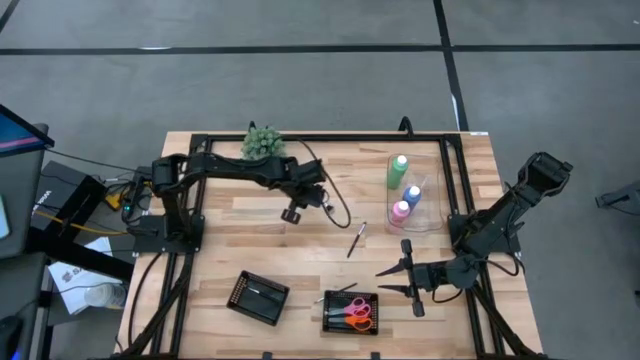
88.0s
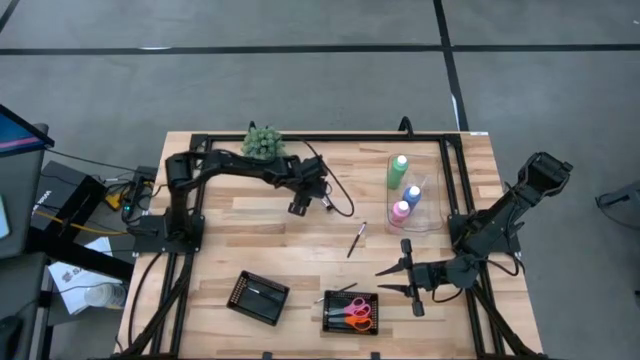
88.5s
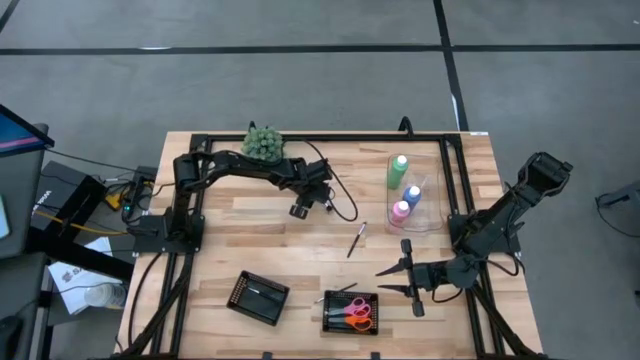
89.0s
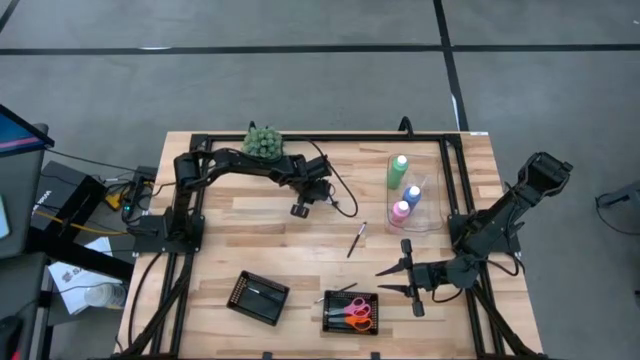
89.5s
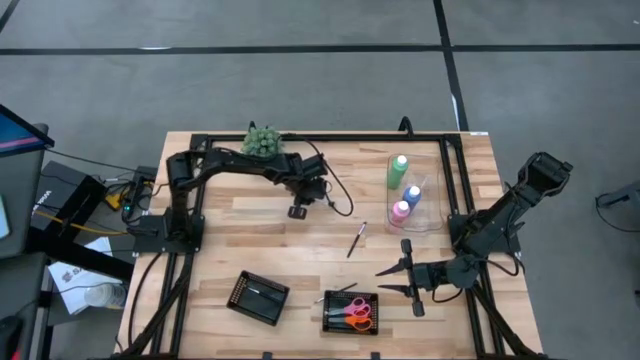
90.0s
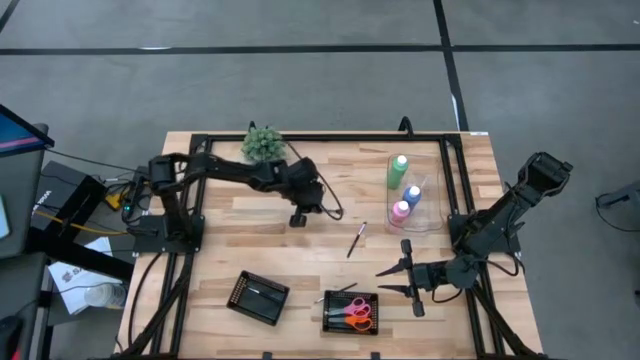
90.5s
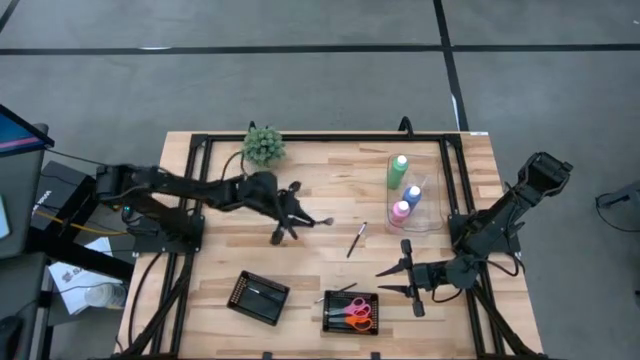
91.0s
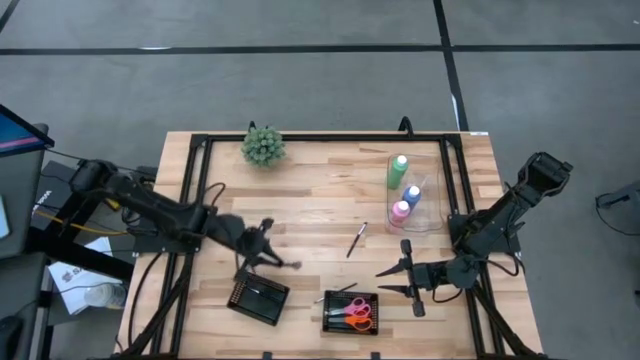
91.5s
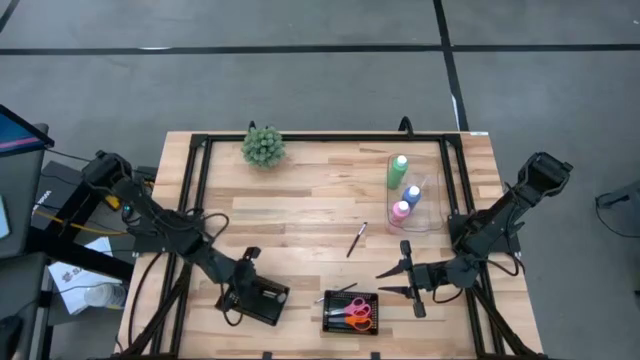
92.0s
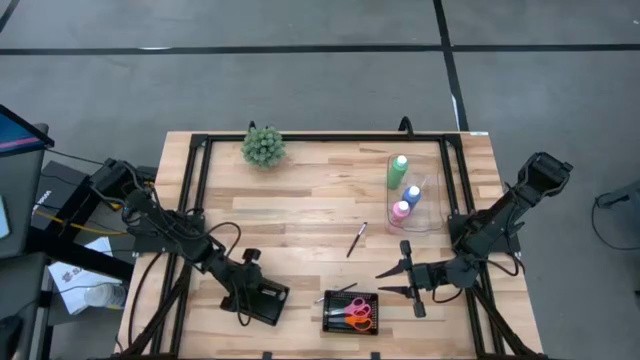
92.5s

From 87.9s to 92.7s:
Task: Pick & Place Paint Supplies
Put the black makeup brush into the left black bin

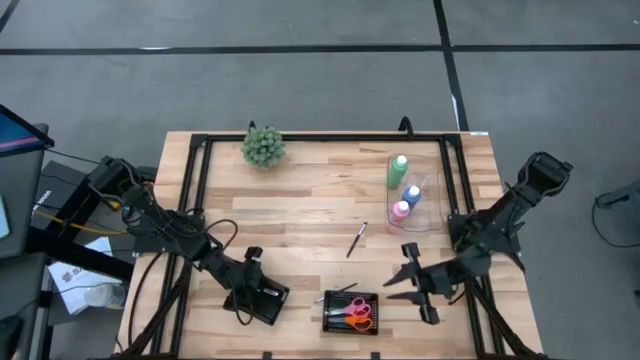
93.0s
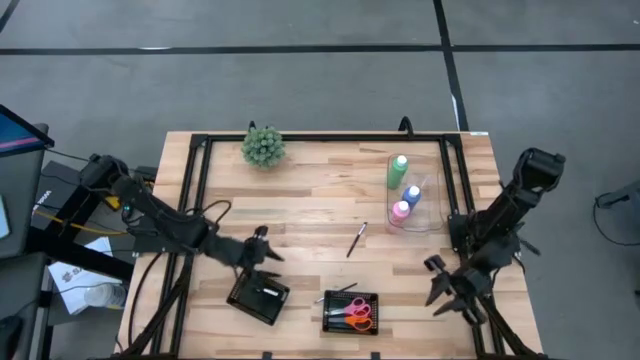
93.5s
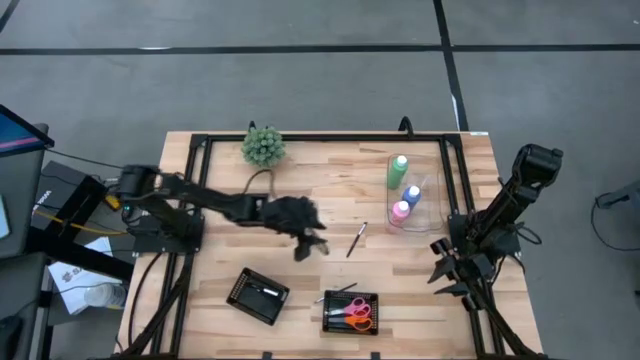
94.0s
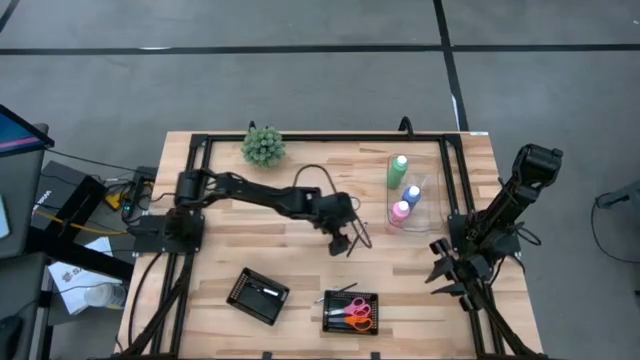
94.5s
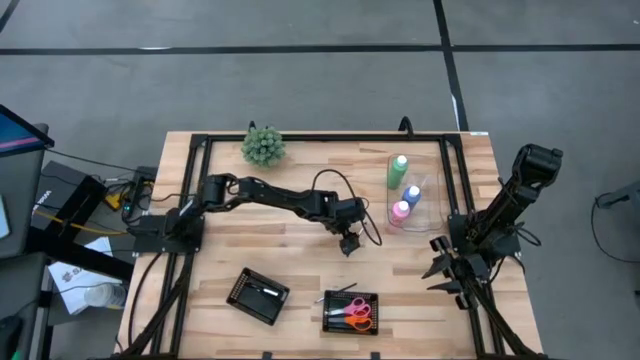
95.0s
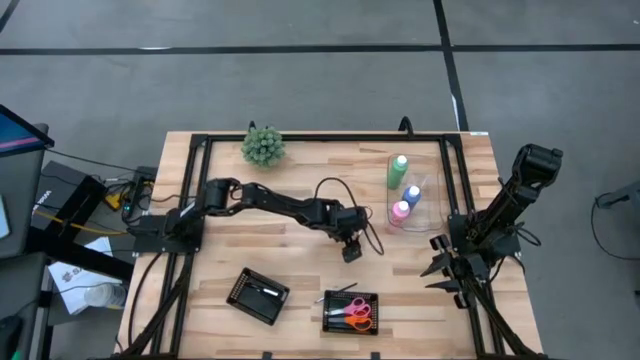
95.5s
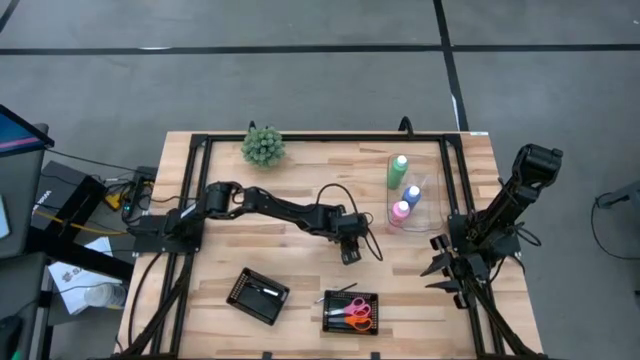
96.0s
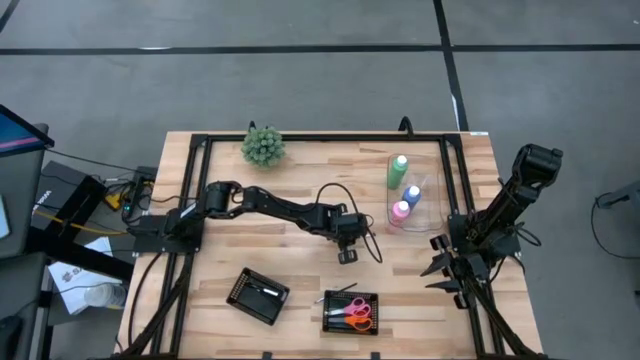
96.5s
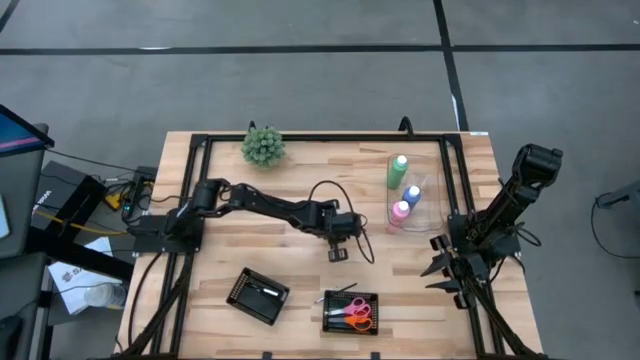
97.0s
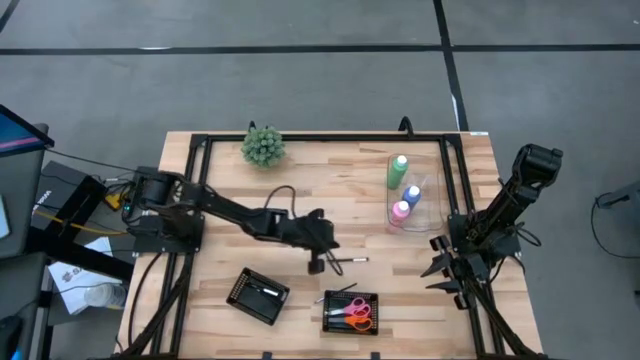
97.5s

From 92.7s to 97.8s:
Put the black makeup brush into the left black bin

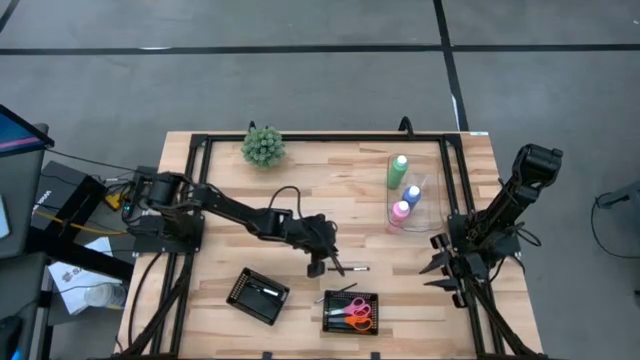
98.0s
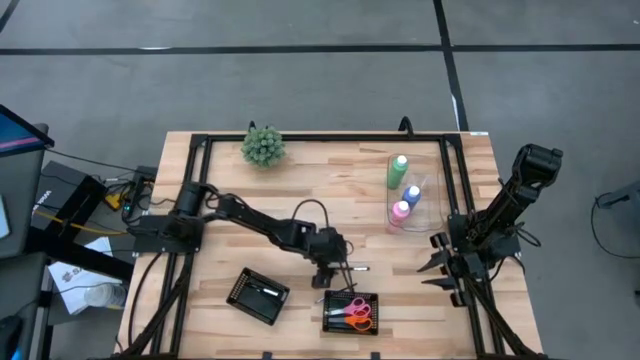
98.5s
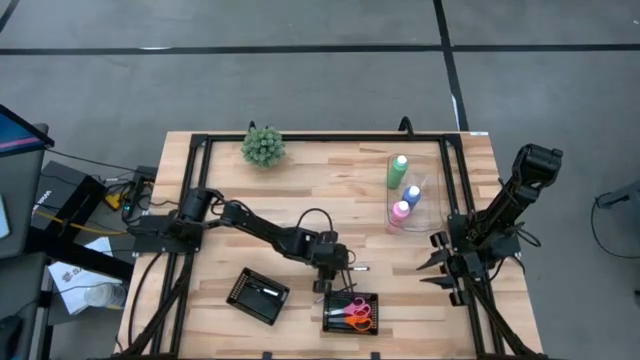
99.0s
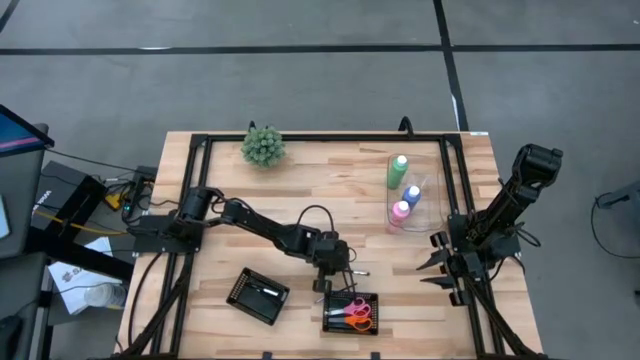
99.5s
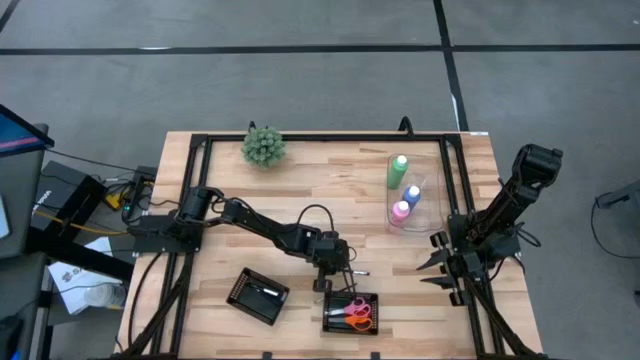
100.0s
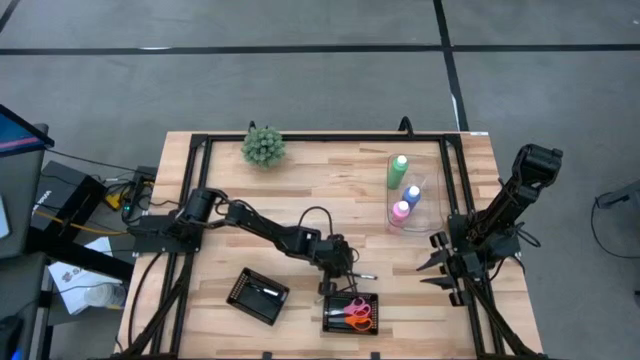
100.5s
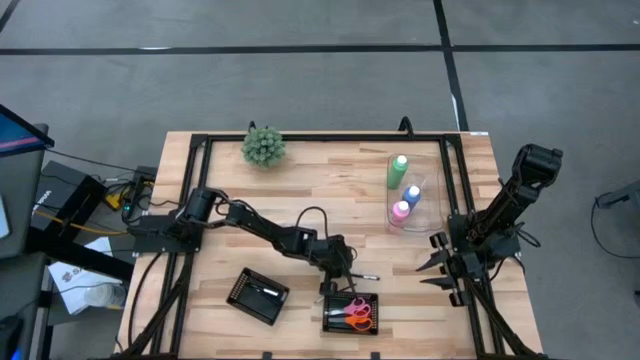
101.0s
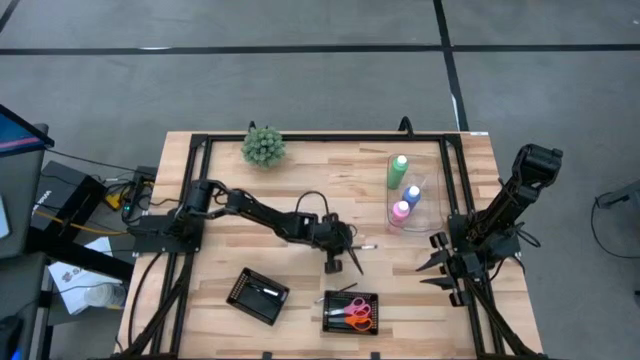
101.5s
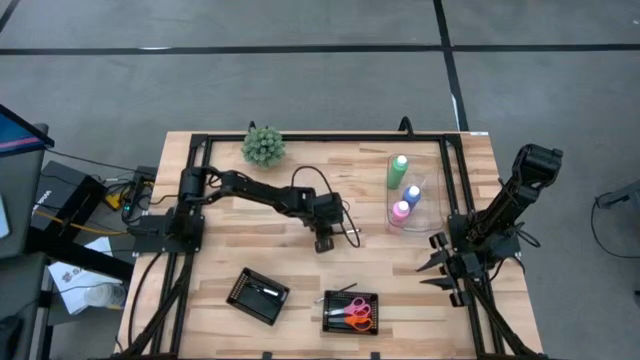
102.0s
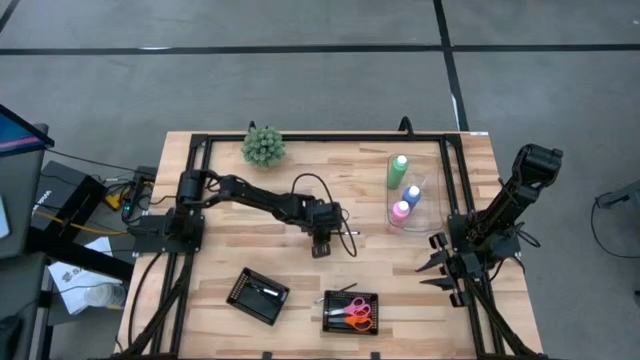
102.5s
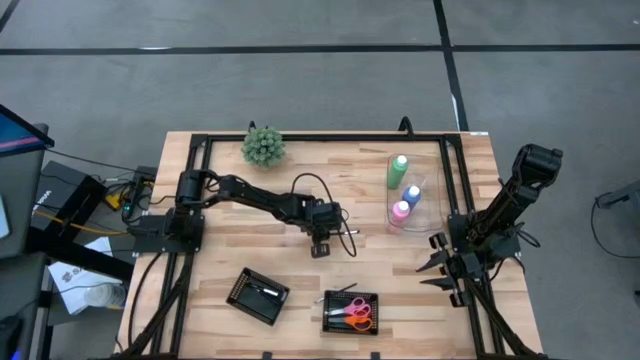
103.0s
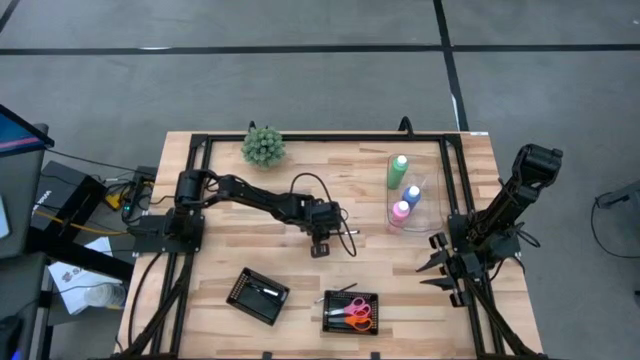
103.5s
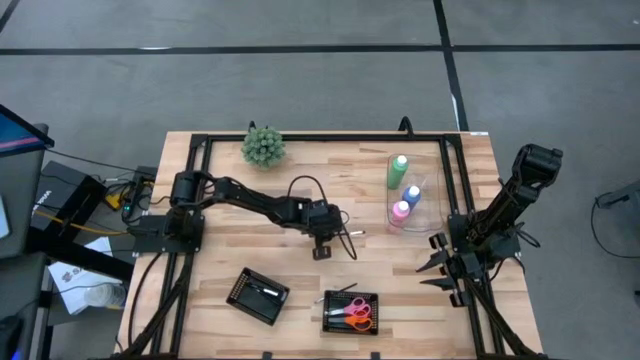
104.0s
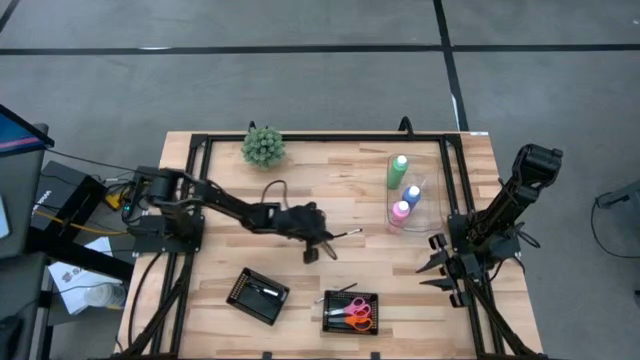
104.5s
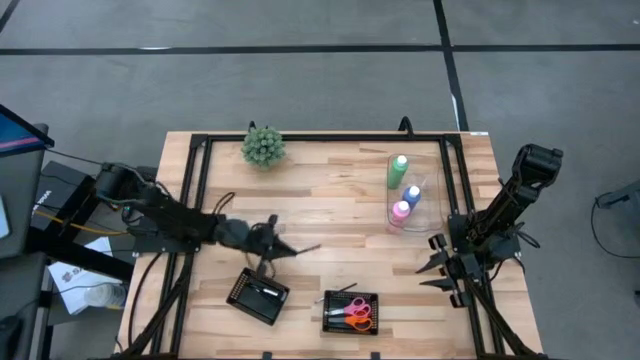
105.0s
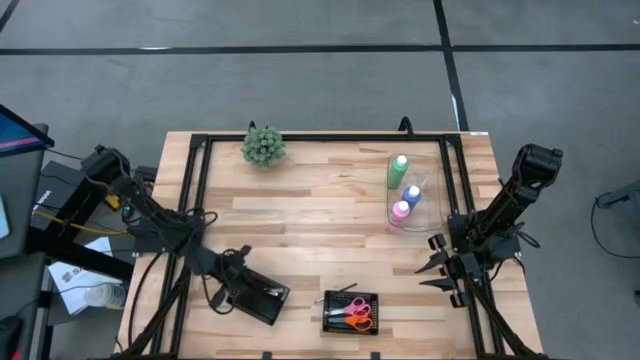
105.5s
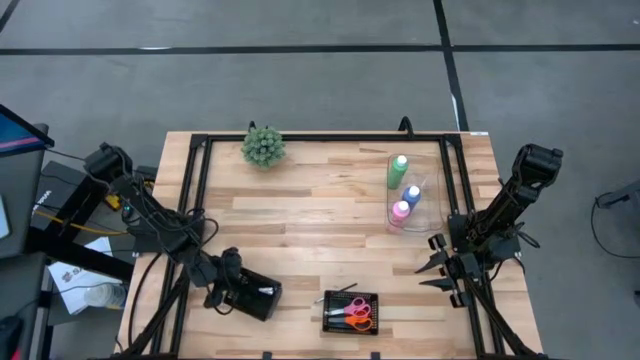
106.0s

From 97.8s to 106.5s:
Put the black makeup brush into the left black bin

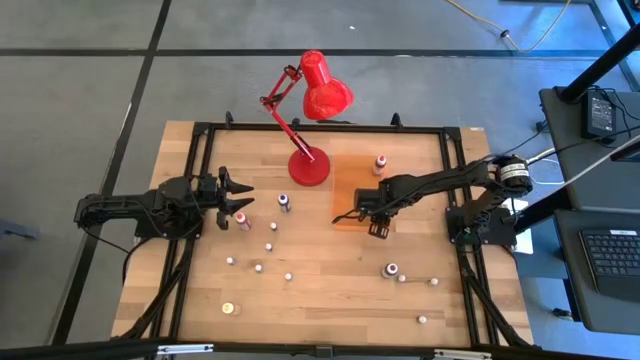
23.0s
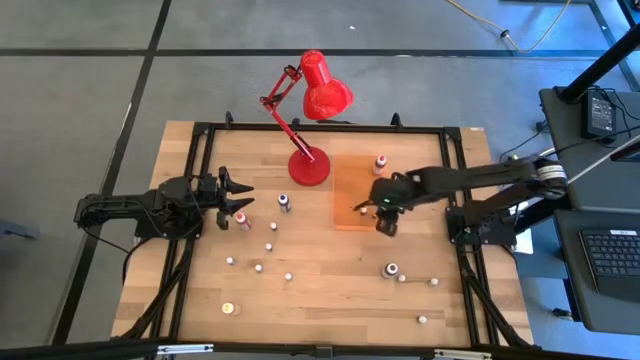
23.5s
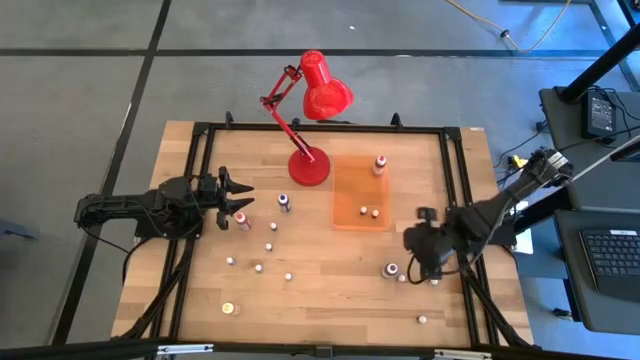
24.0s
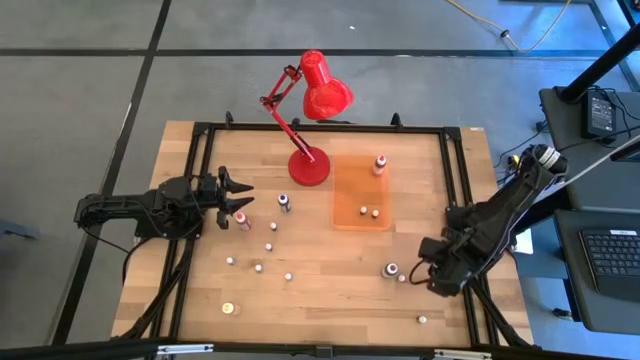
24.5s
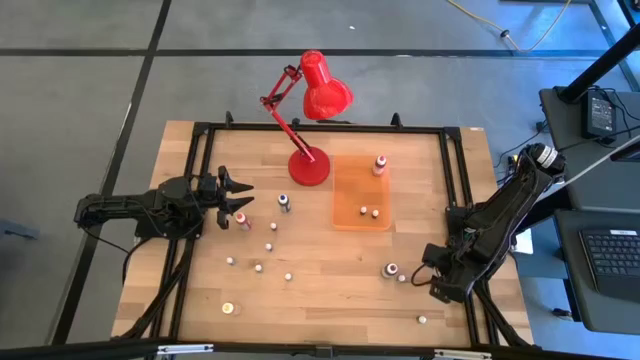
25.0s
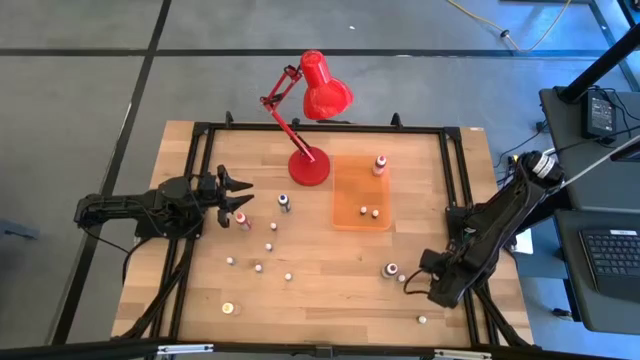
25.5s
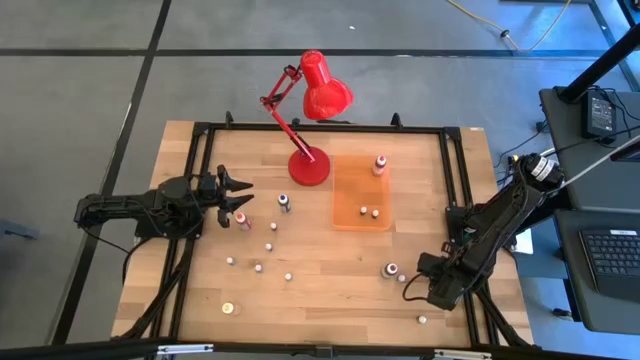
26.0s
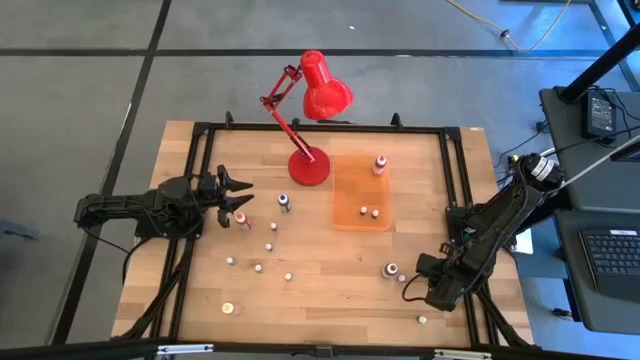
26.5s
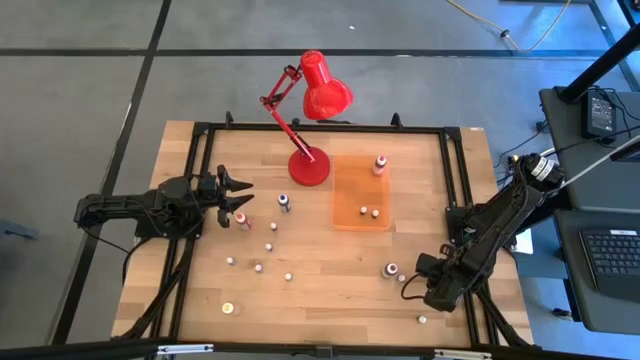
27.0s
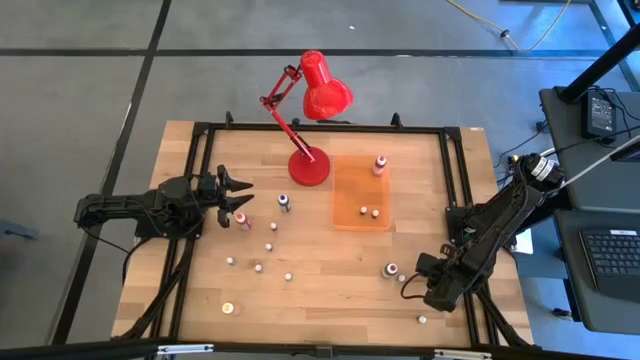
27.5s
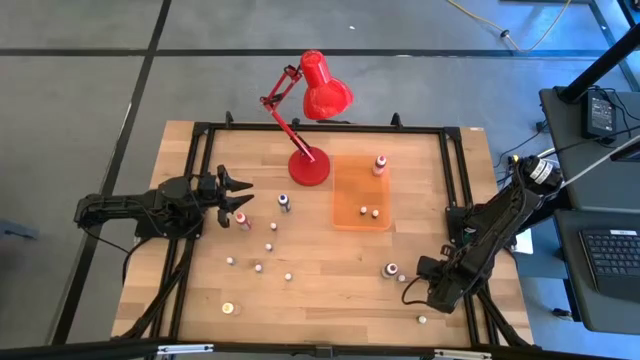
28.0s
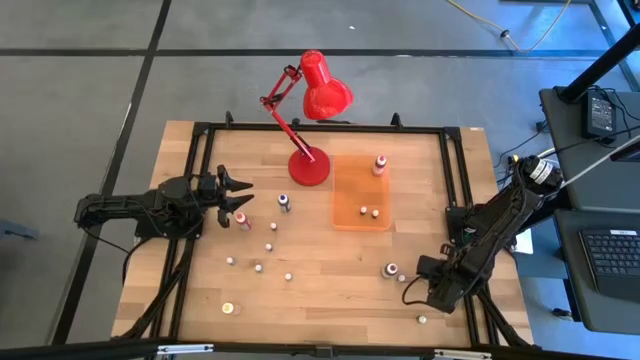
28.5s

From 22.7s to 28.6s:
Task: Pick & Place food coloring
Put the right small purple food coloring bottle into the orange bin
